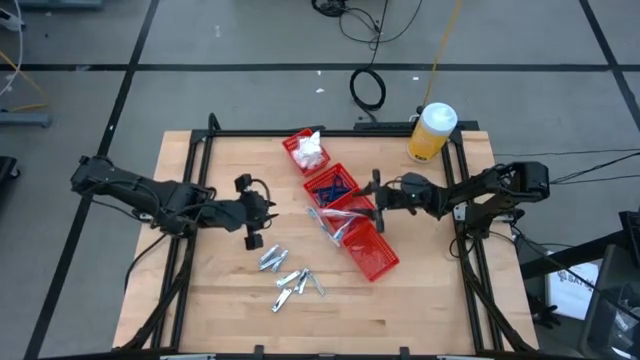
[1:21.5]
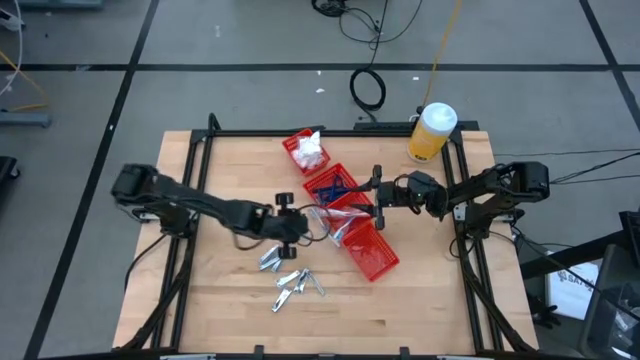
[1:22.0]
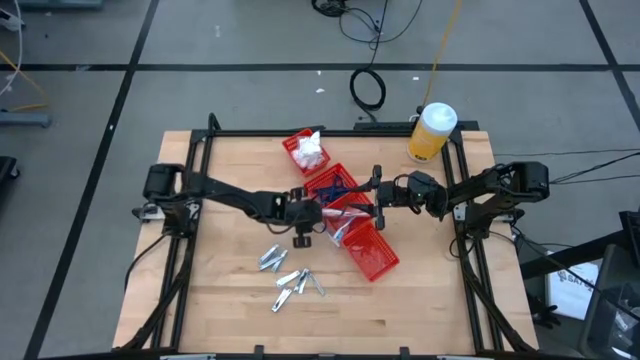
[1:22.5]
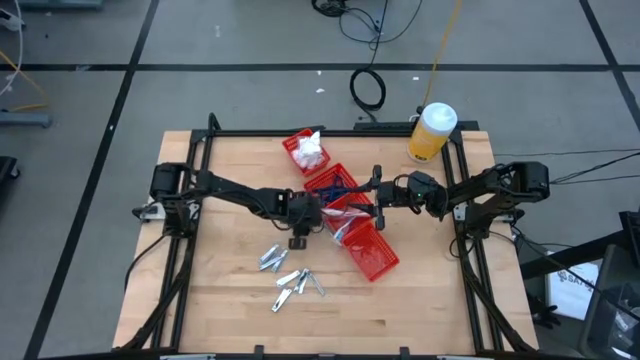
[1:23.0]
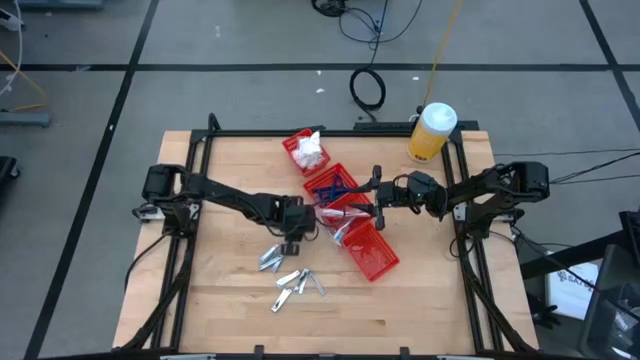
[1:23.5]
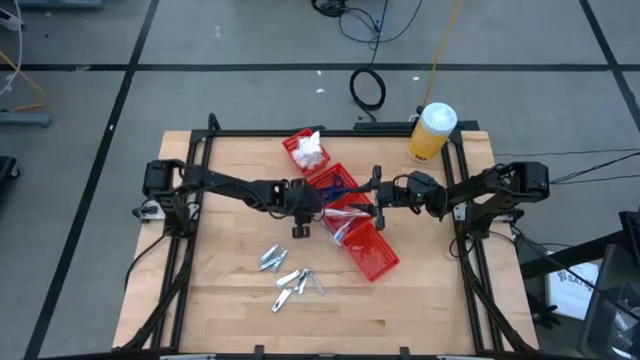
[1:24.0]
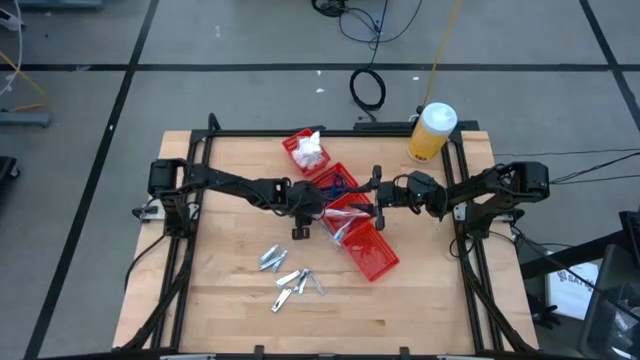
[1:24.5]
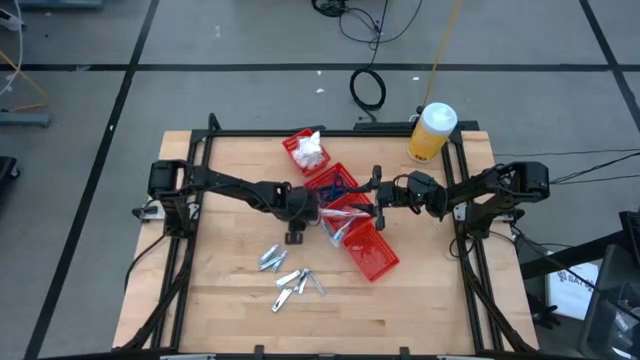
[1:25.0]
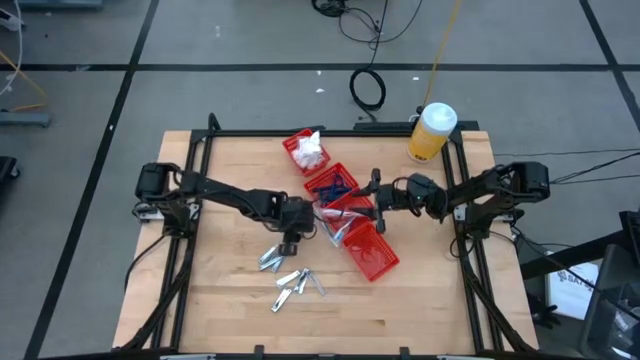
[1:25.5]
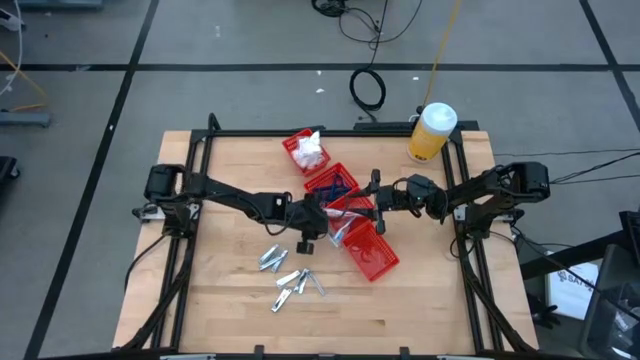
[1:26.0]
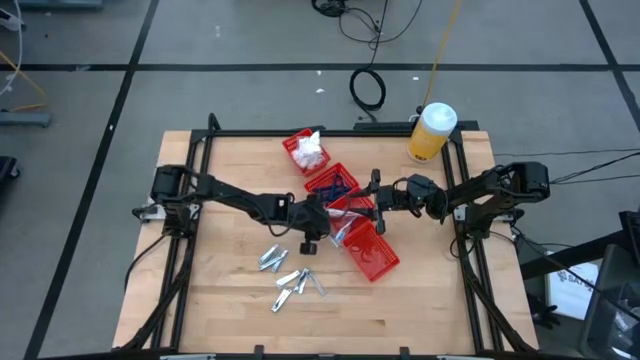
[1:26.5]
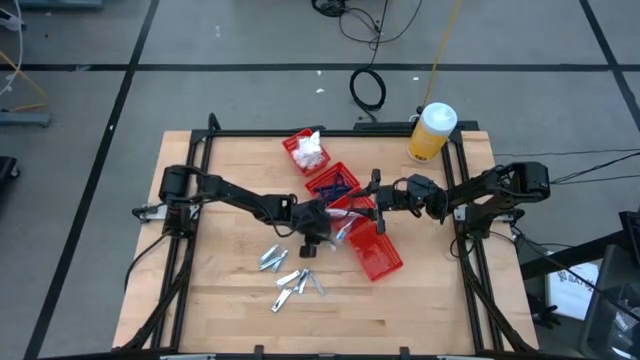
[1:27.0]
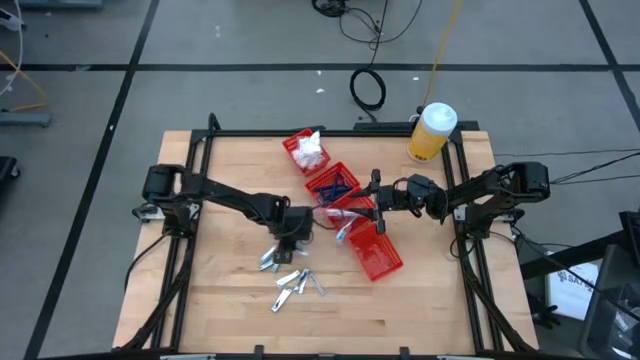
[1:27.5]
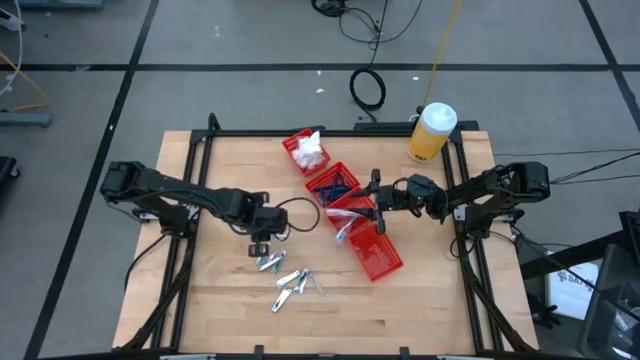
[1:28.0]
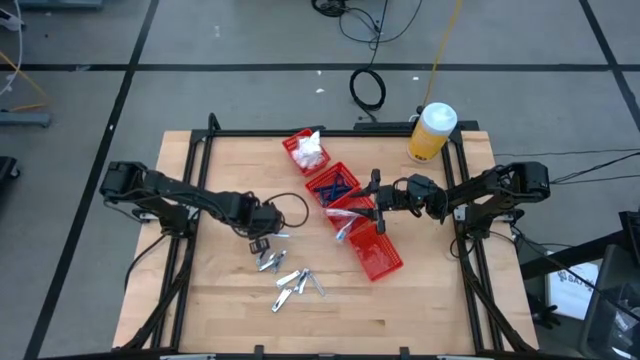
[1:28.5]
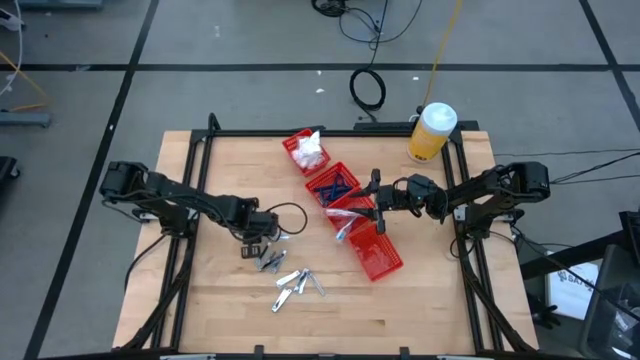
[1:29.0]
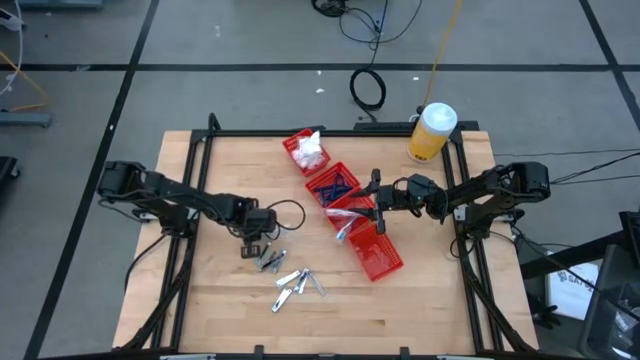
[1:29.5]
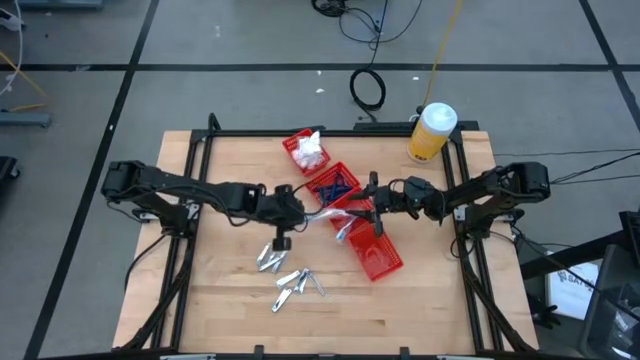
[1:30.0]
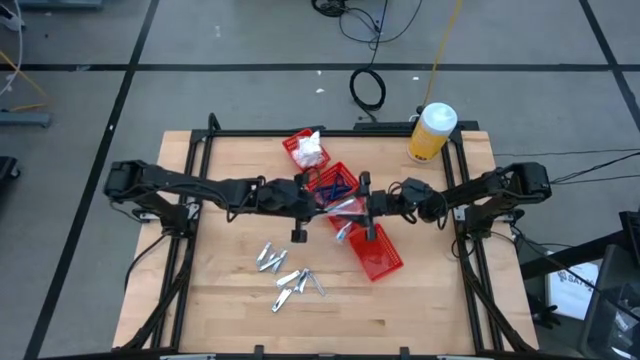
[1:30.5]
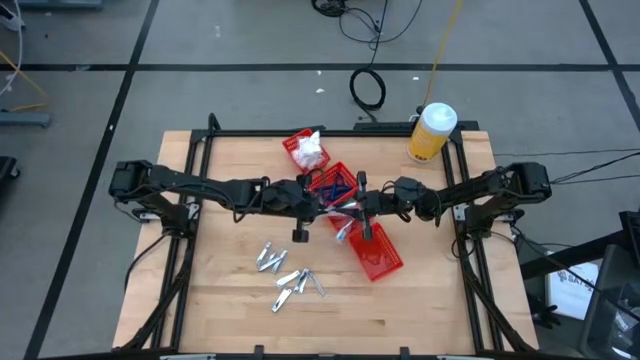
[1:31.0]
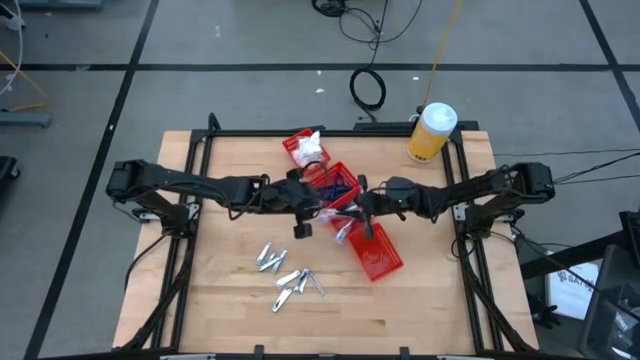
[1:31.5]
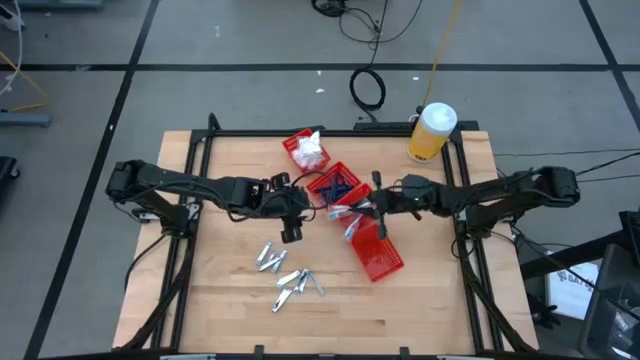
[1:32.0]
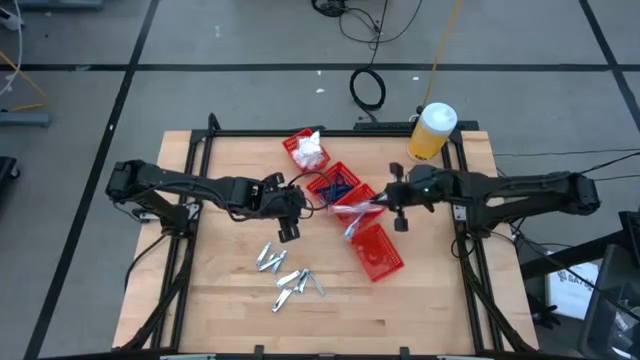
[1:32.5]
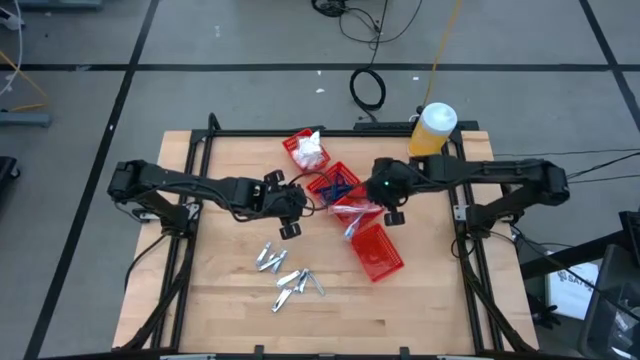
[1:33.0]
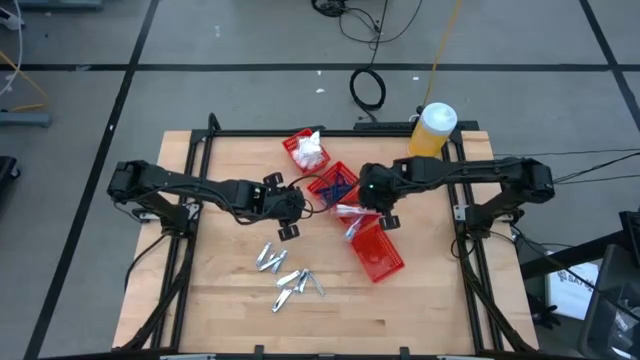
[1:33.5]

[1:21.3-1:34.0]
Task: Pick & Place Travel size toiletries
Put the blue toothbrush into the bottom middle red bin

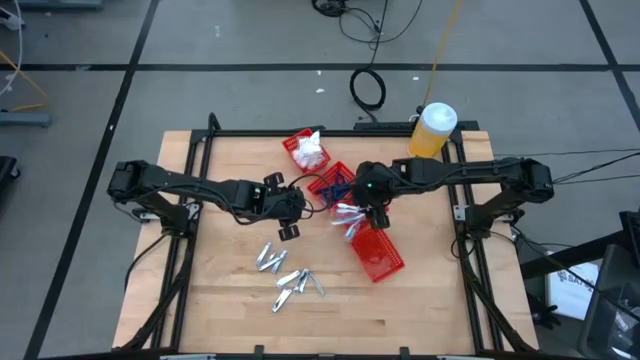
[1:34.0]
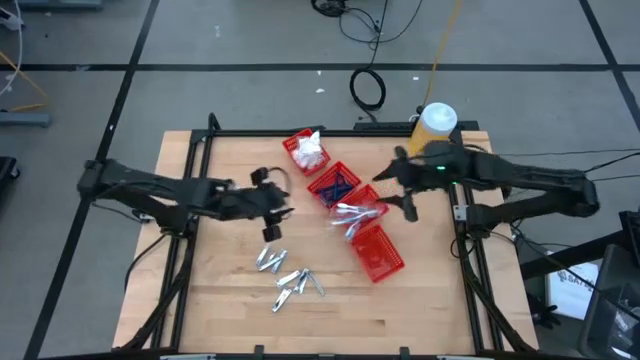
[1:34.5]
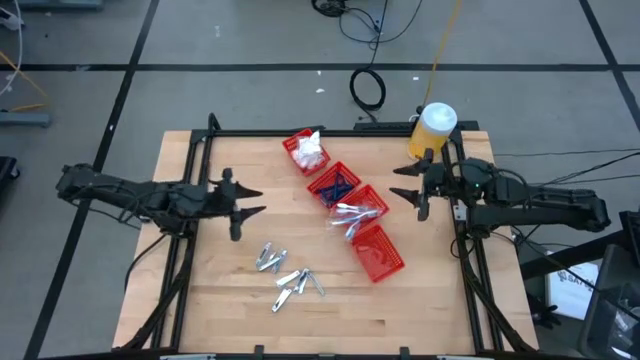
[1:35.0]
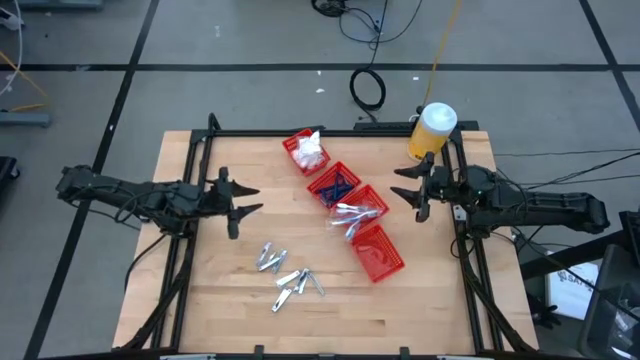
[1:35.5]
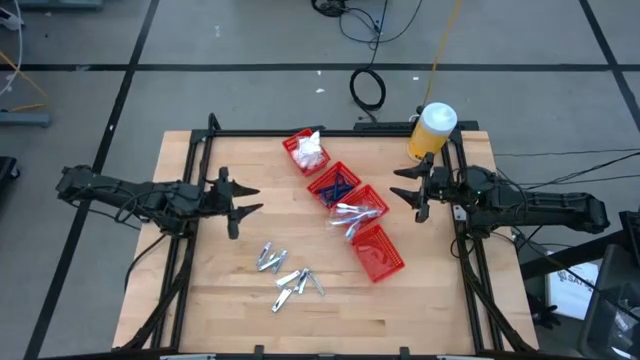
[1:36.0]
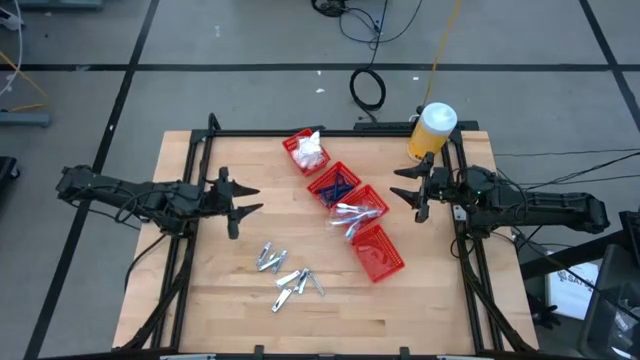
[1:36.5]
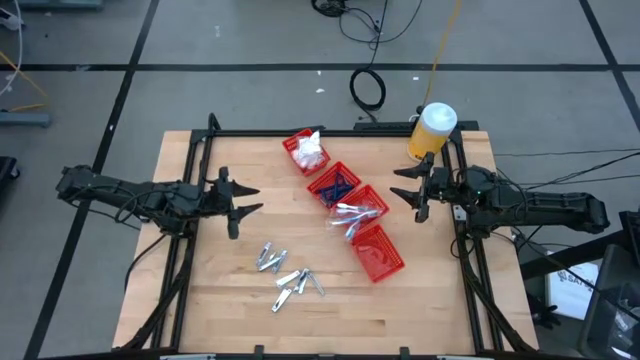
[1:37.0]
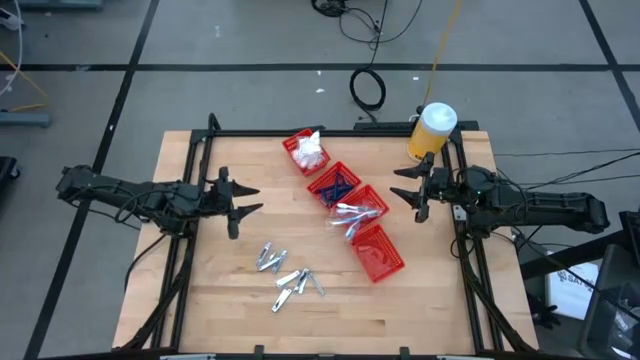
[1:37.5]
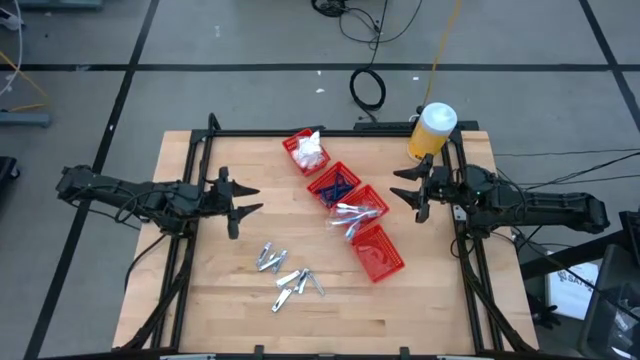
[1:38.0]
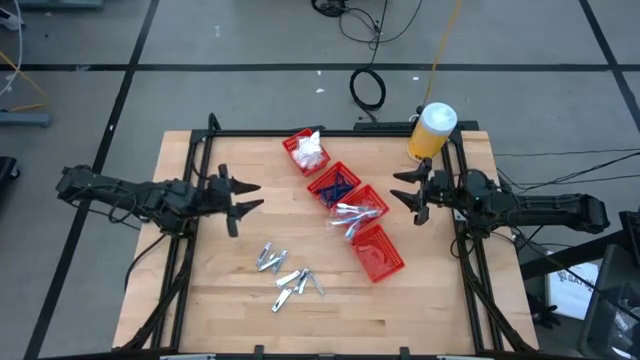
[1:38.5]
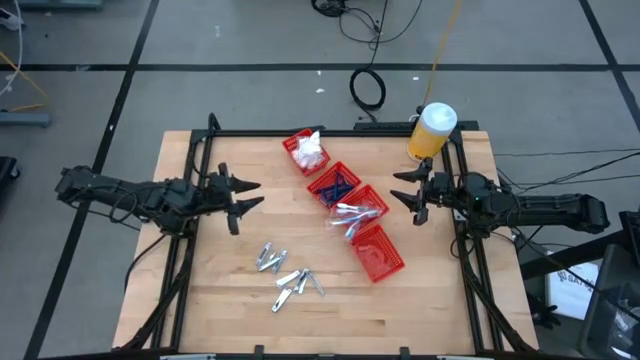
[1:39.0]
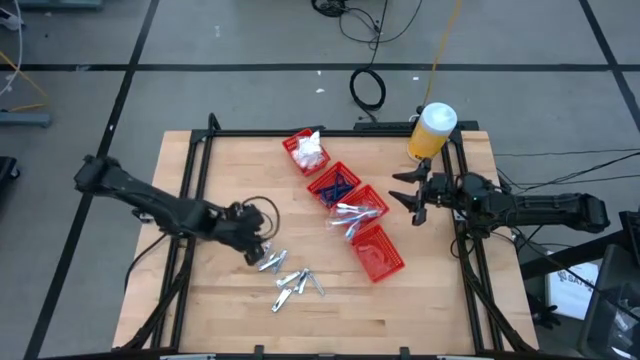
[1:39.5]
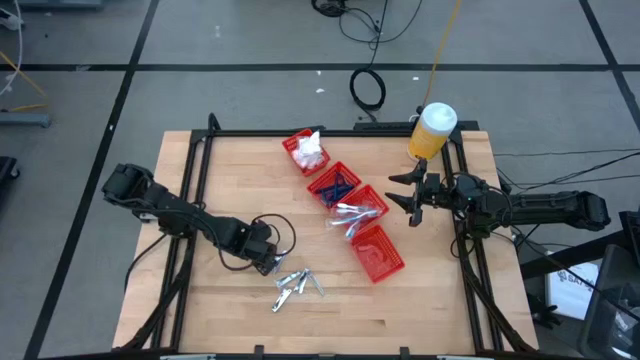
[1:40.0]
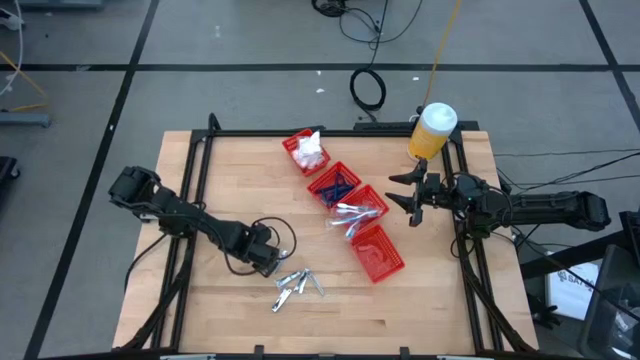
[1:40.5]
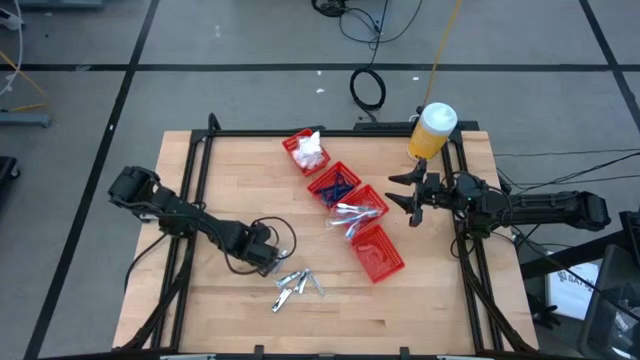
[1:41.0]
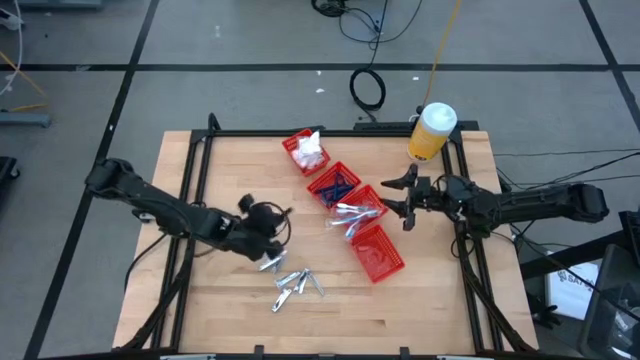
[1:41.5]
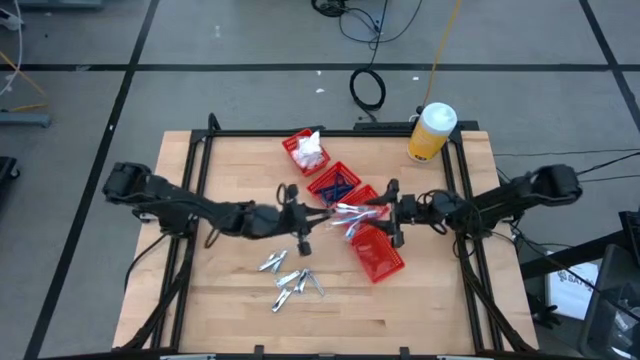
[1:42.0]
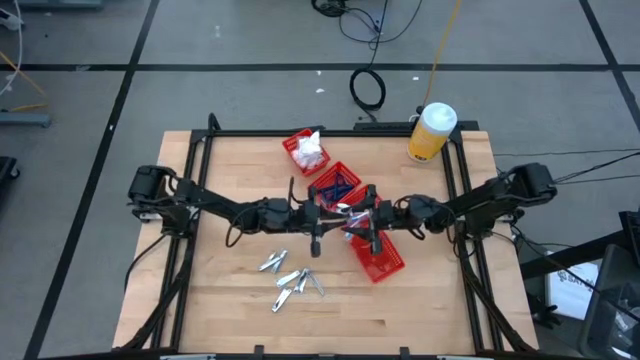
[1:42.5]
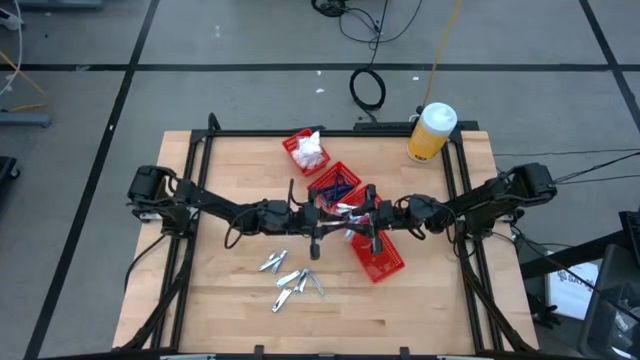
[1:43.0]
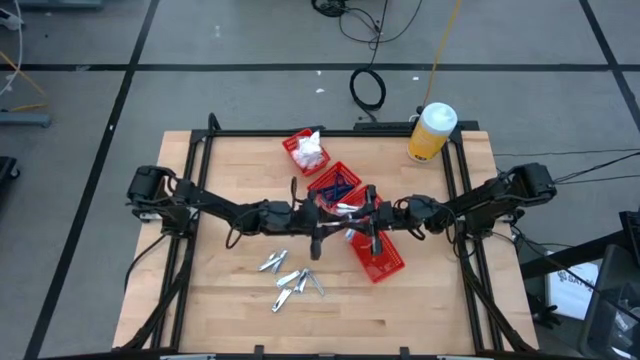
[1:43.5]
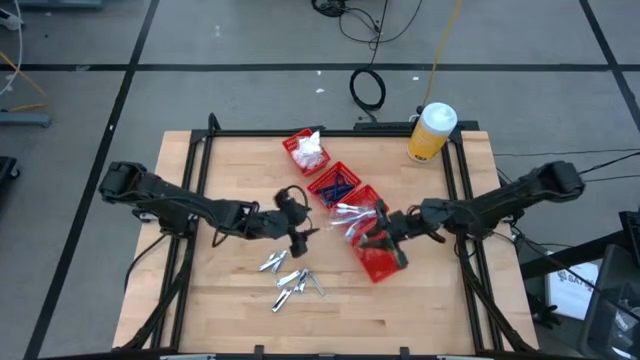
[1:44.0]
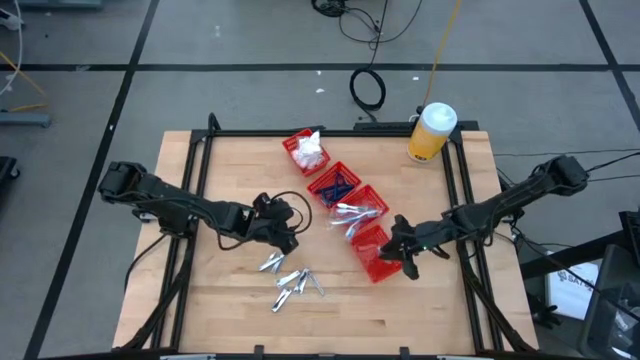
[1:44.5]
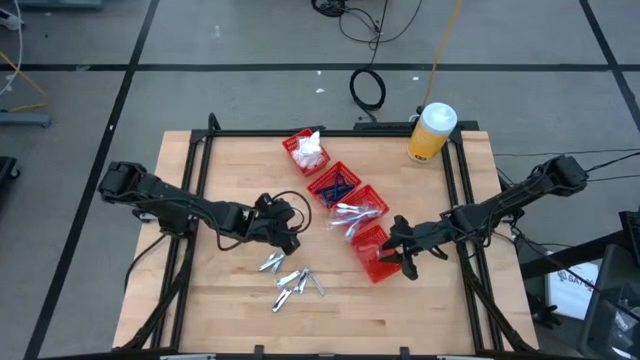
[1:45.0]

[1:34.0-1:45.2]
Put the nail cutter into the bottom red bin
